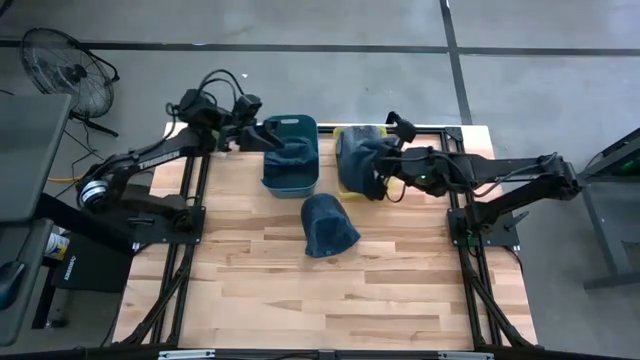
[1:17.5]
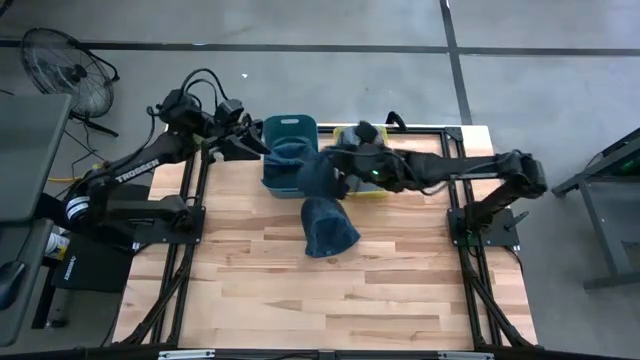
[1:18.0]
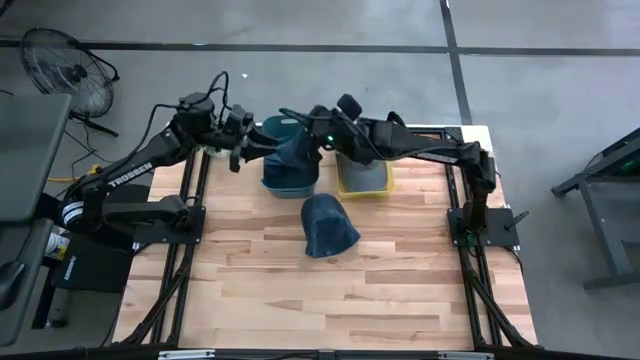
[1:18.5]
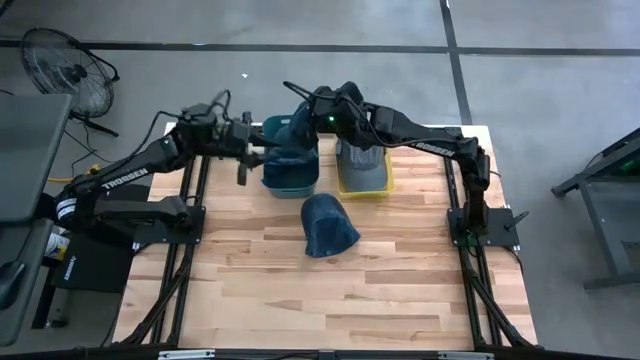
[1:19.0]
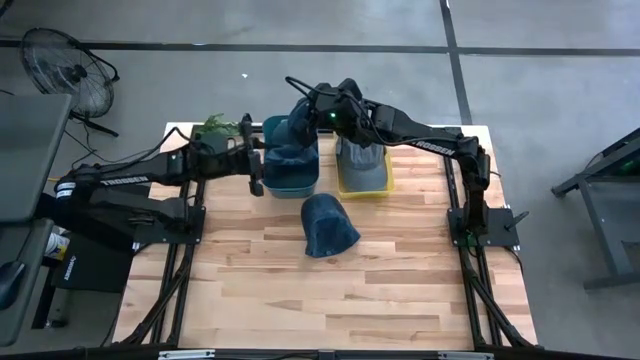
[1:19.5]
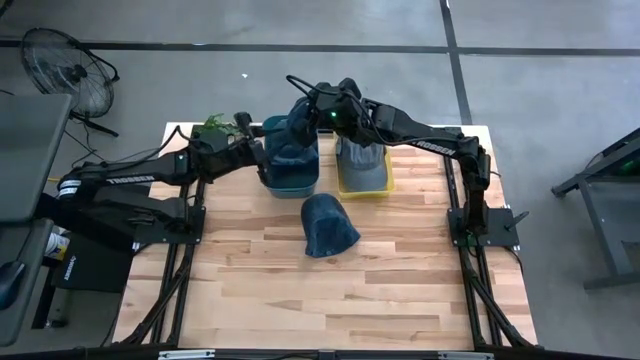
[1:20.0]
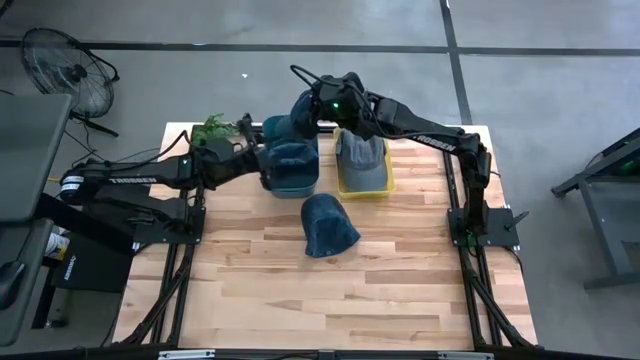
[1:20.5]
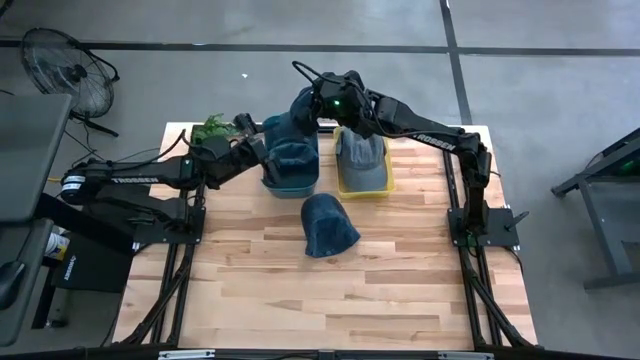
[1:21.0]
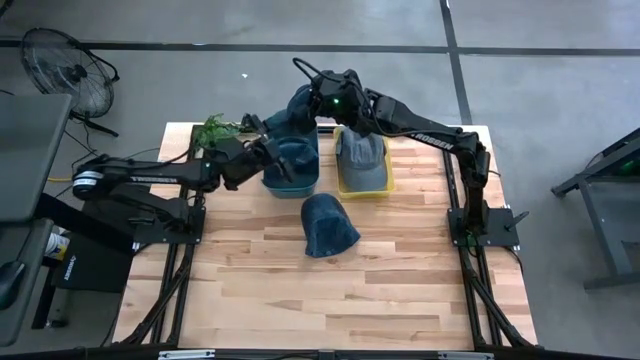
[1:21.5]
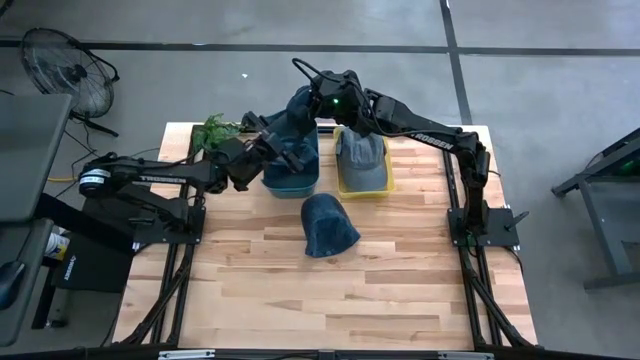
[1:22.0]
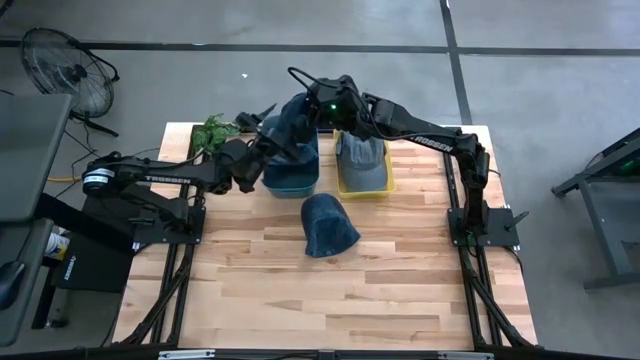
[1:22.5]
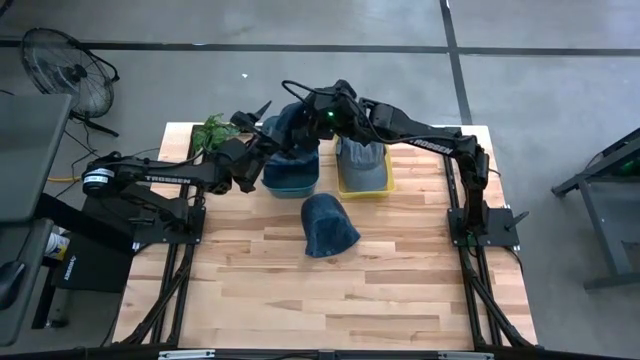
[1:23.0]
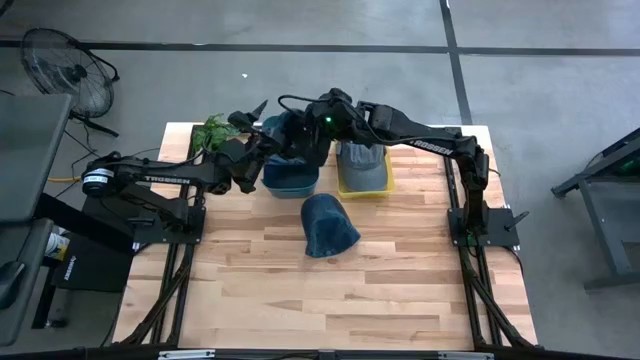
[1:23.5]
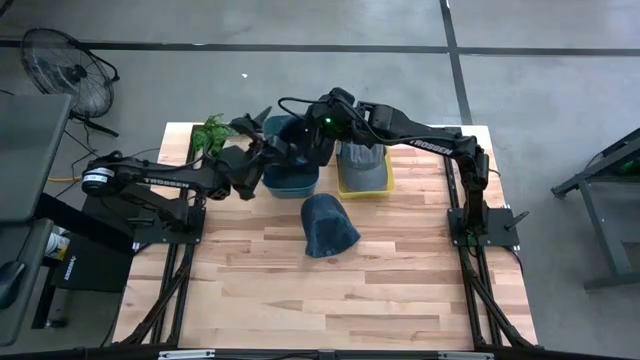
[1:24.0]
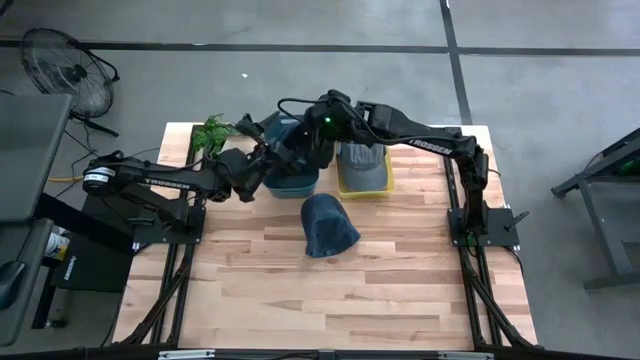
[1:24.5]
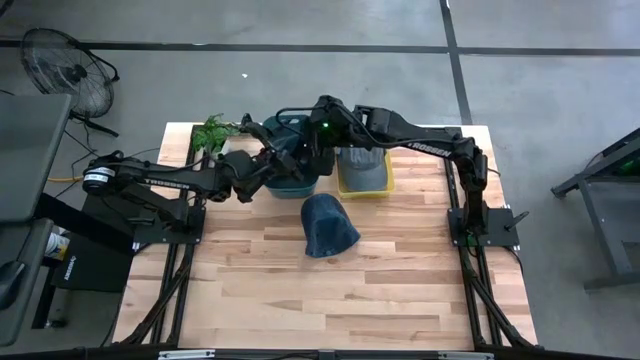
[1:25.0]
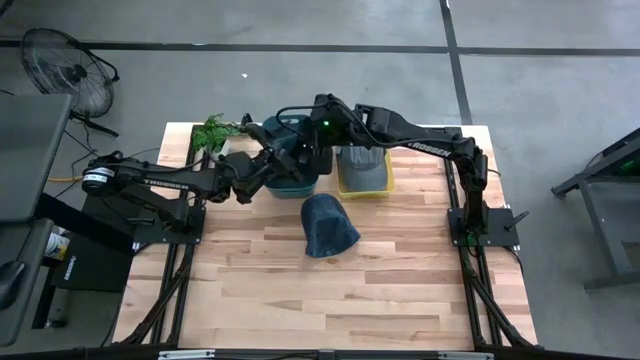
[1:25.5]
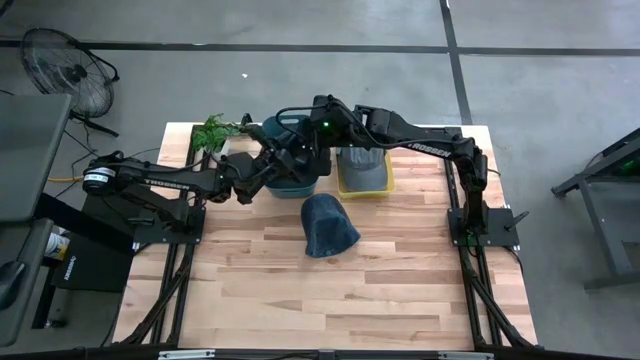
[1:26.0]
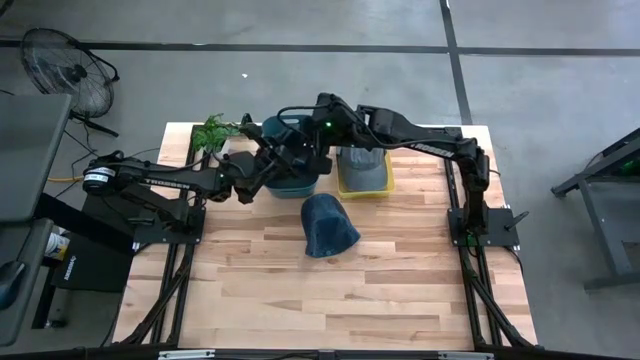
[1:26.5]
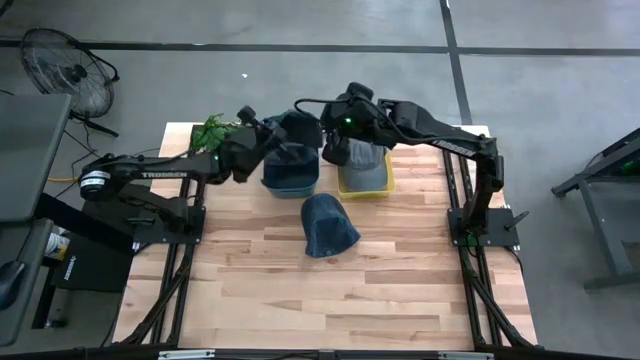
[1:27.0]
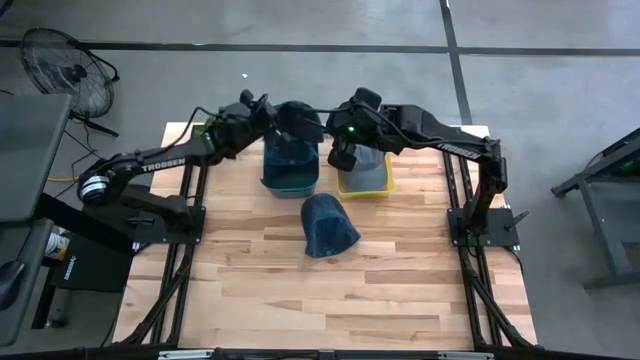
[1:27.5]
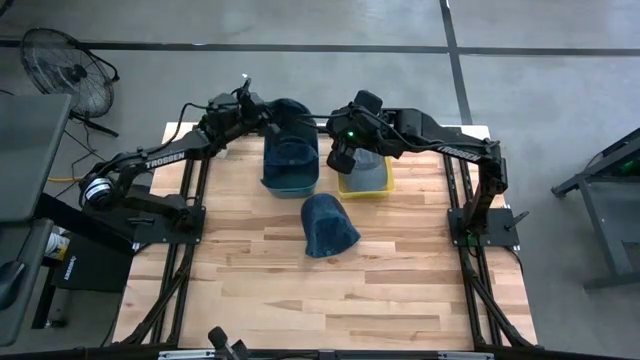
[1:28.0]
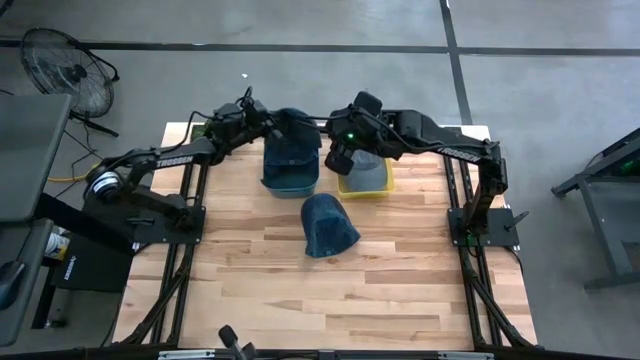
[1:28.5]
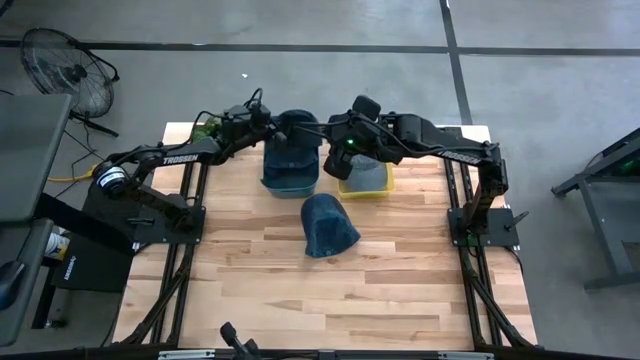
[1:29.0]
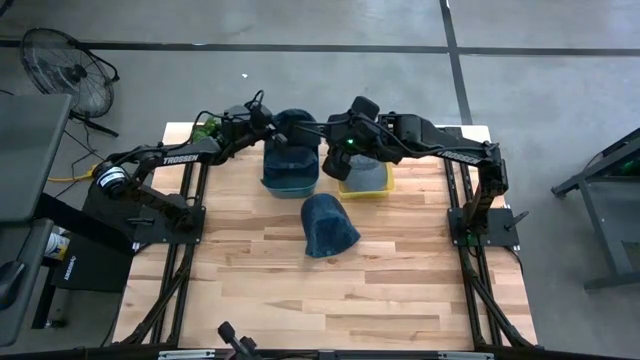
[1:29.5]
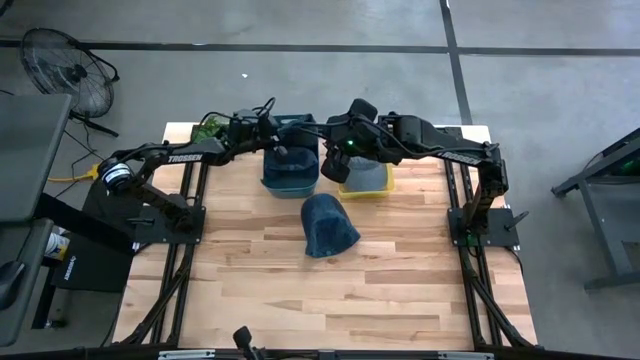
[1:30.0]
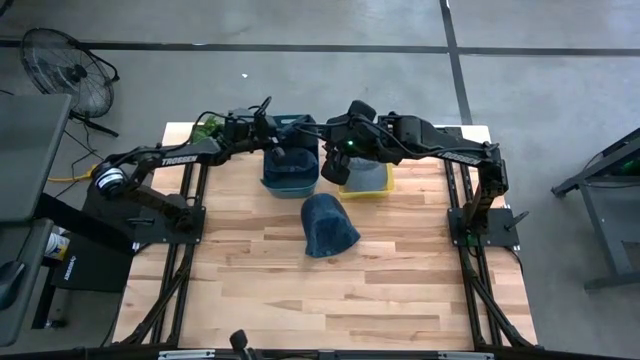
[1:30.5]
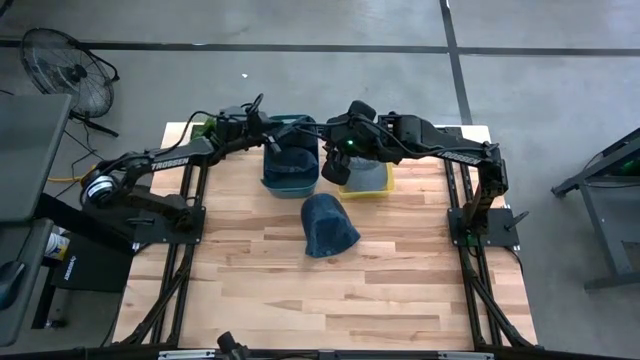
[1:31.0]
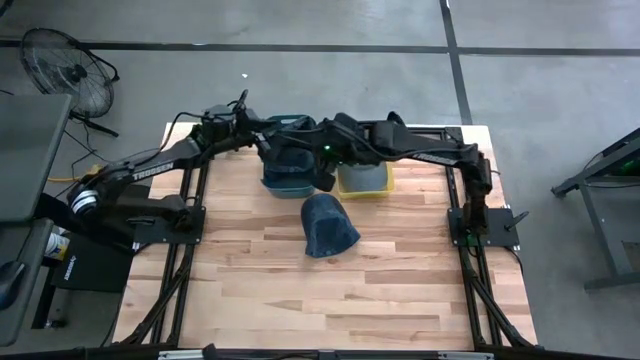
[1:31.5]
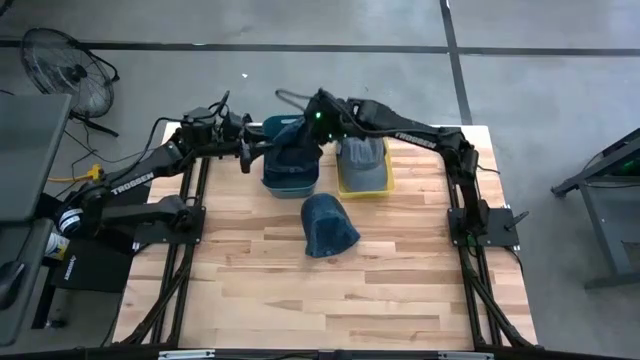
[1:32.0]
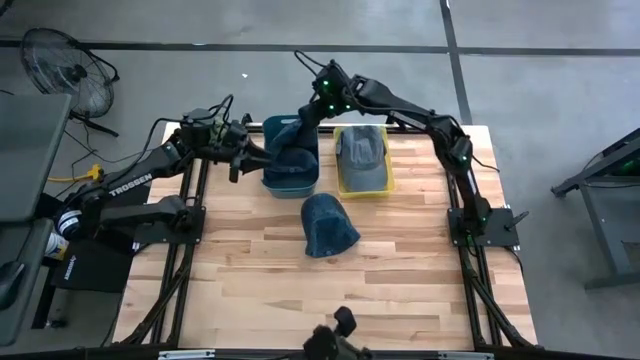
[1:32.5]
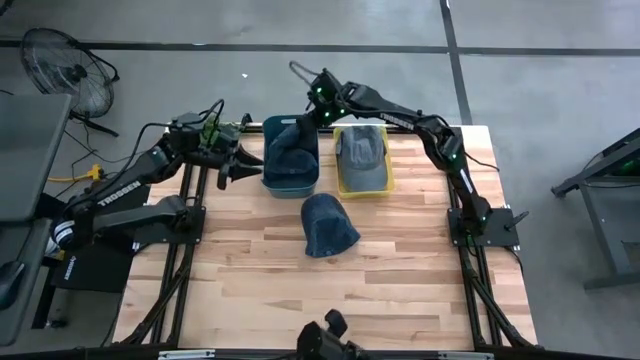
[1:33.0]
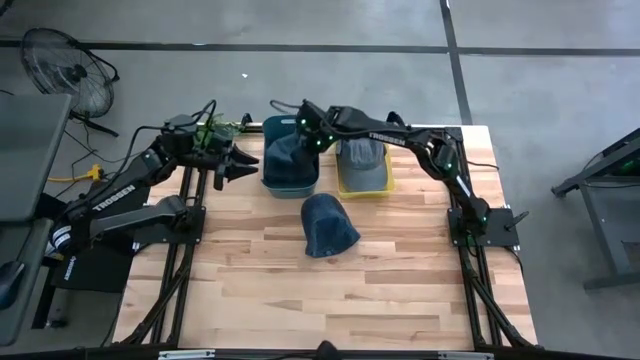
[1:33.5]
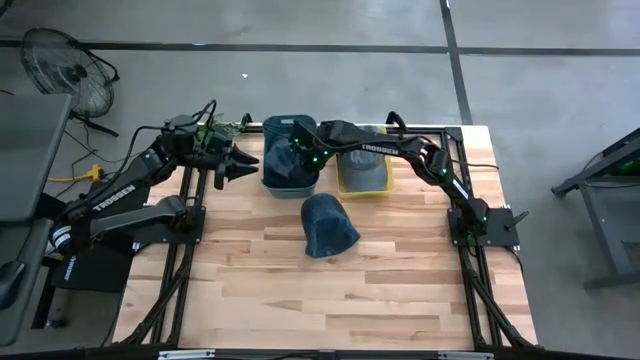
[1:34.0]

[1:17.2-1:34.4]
Task: Pick & Place hat
Put the left blue cap into the blue bin

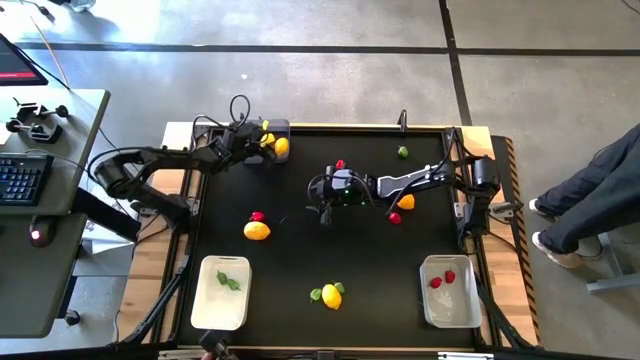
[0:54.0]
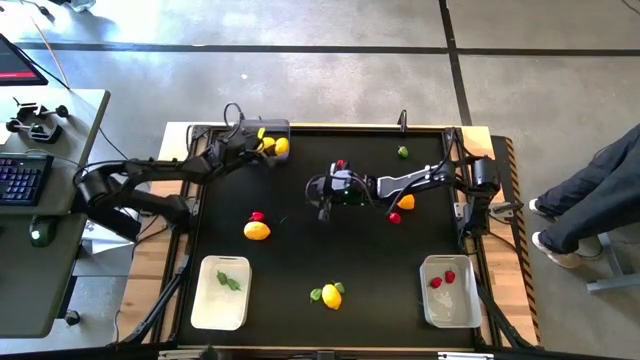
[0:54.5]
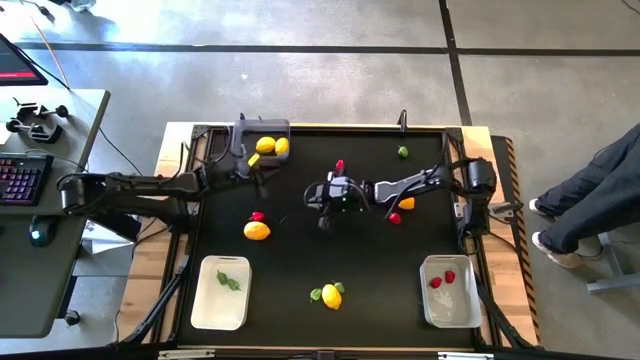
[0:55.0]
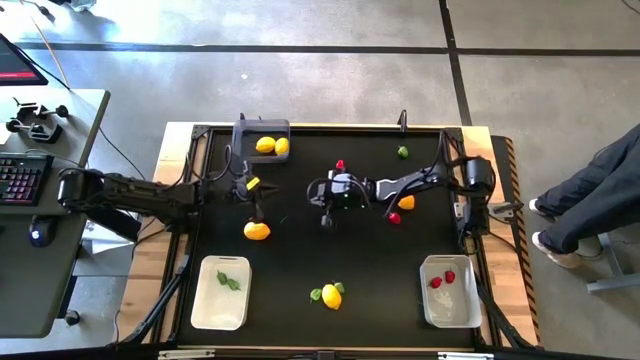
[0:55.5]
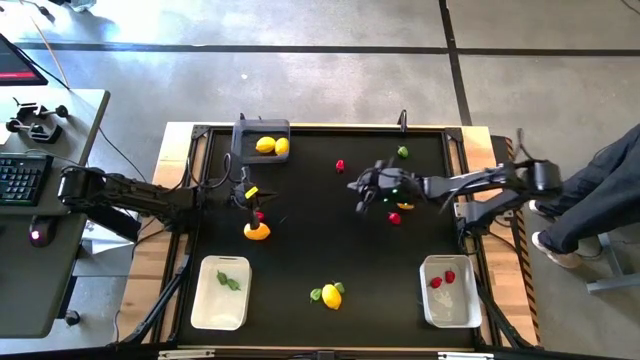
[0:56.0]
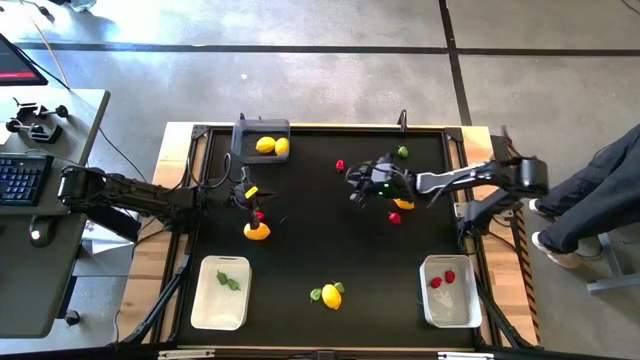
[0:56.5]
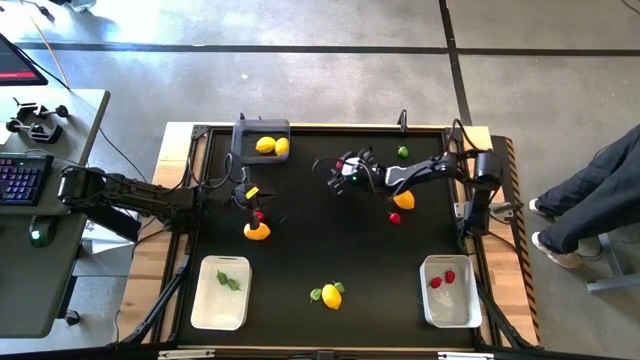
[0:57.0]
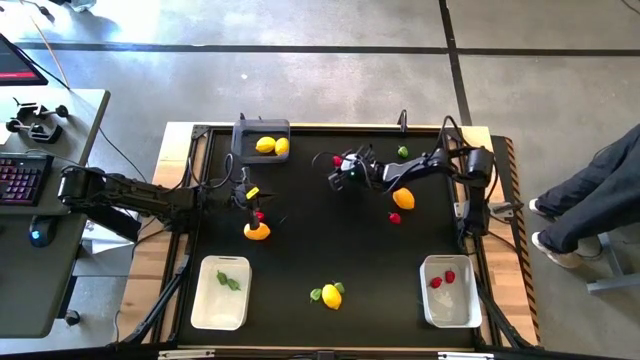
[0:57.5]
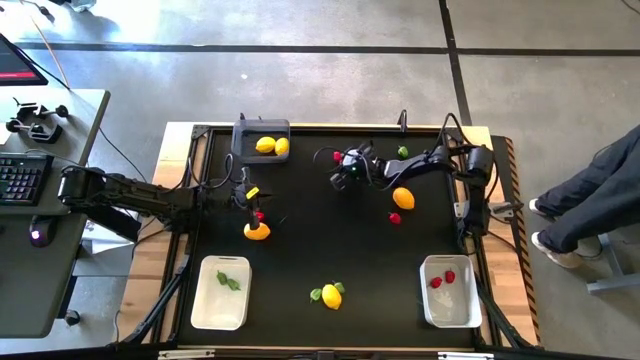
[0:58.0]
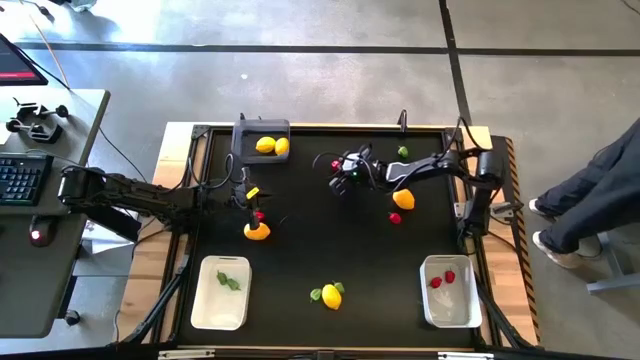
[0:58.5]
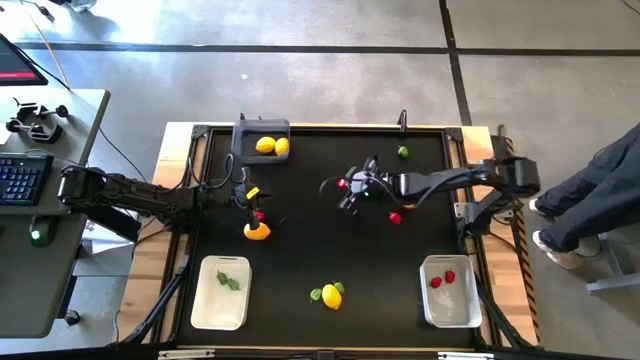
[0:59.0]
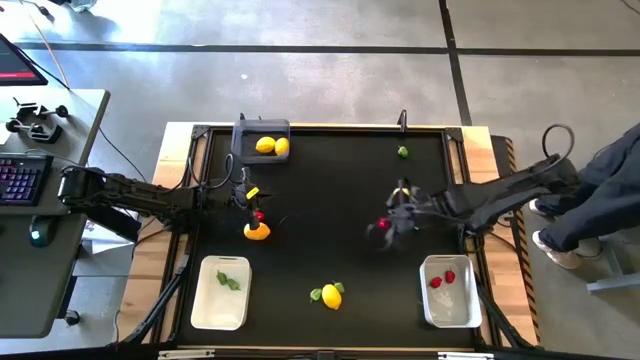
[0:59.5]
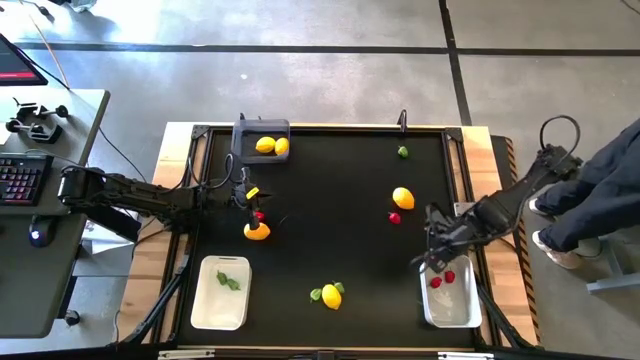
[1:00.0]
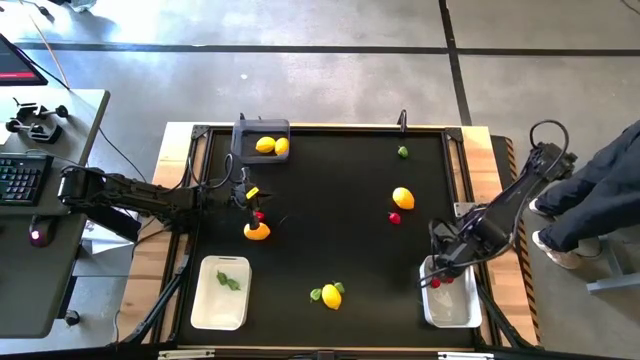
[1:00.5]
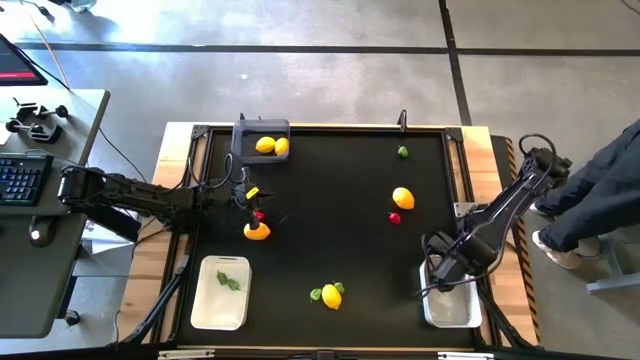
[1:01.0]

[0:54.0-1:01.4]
Task: Sort produce into baskets
Put the red chili pepper into the gray bin
